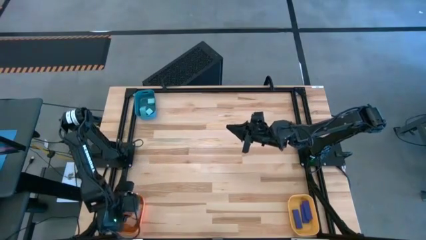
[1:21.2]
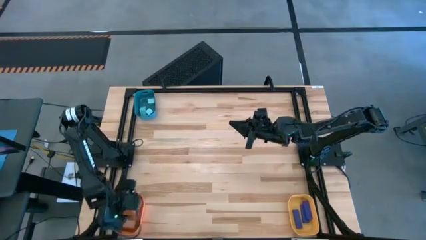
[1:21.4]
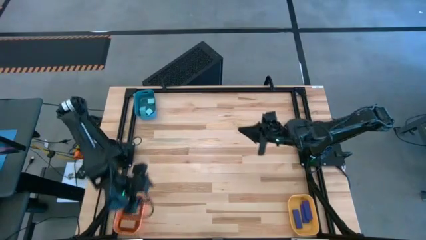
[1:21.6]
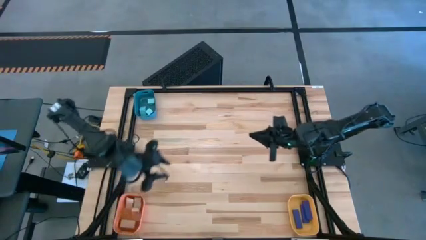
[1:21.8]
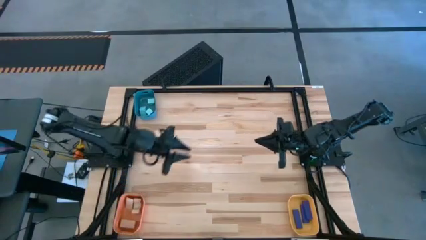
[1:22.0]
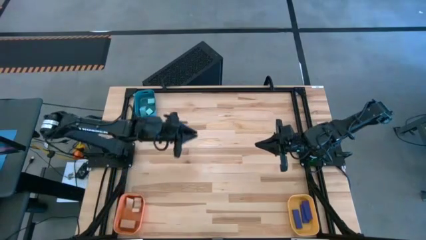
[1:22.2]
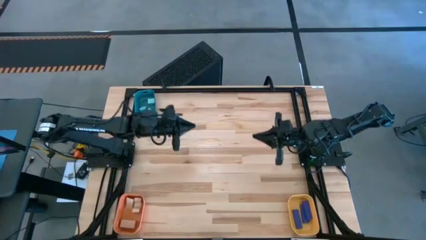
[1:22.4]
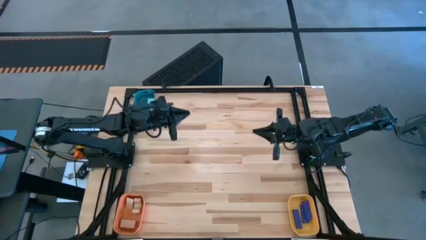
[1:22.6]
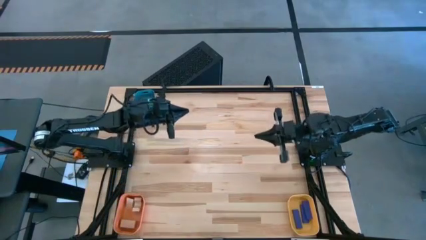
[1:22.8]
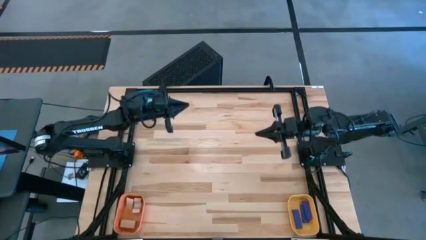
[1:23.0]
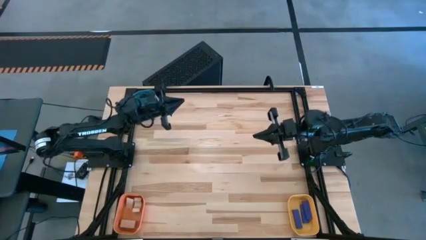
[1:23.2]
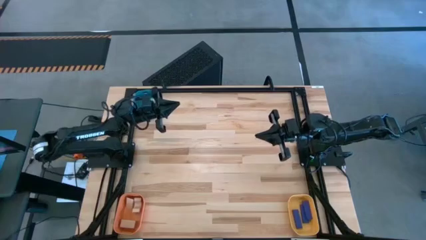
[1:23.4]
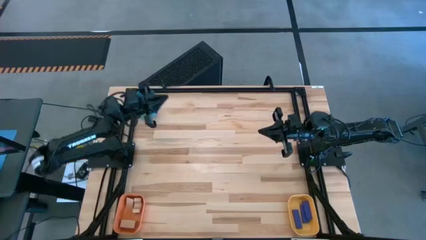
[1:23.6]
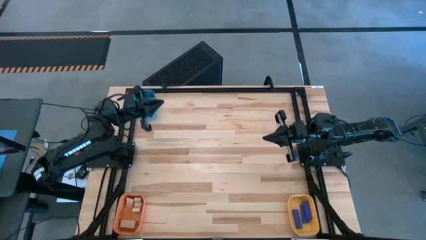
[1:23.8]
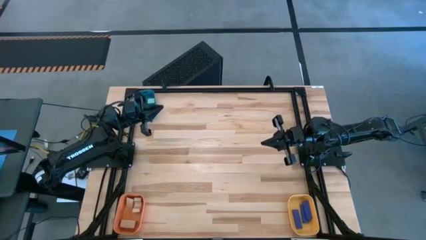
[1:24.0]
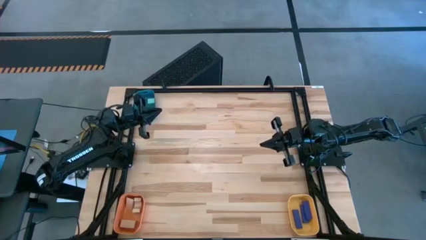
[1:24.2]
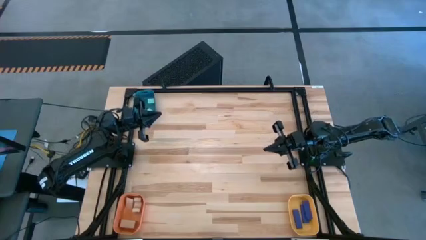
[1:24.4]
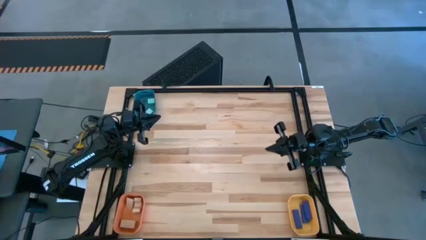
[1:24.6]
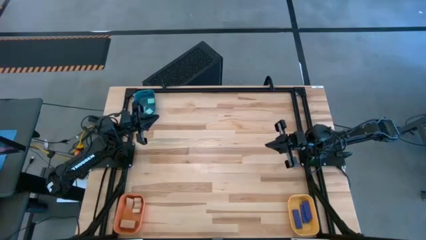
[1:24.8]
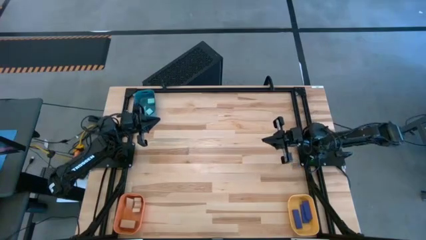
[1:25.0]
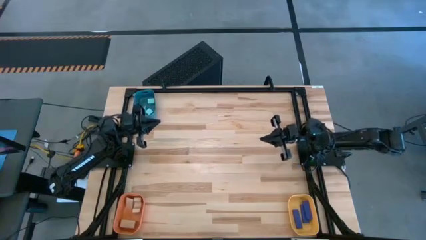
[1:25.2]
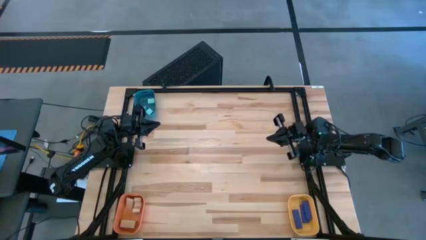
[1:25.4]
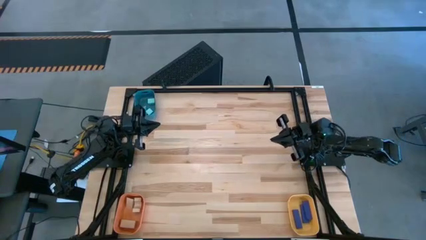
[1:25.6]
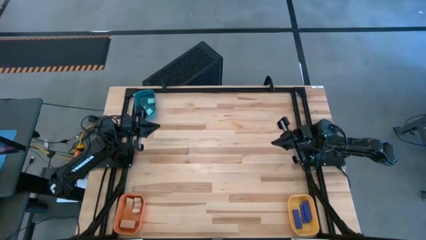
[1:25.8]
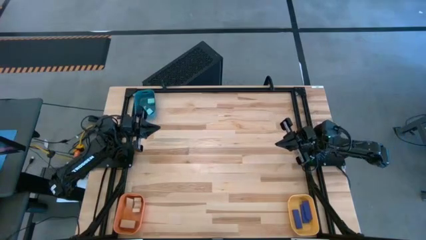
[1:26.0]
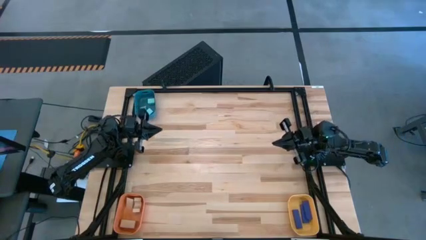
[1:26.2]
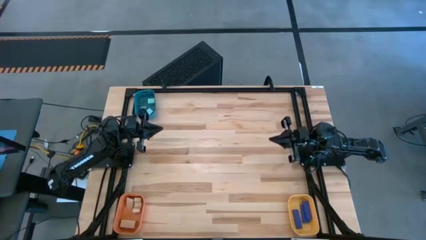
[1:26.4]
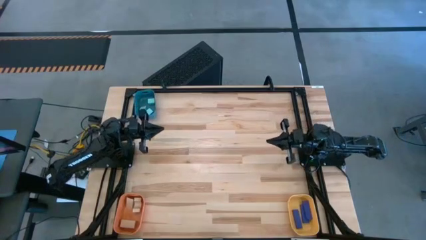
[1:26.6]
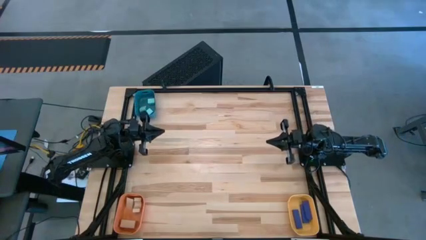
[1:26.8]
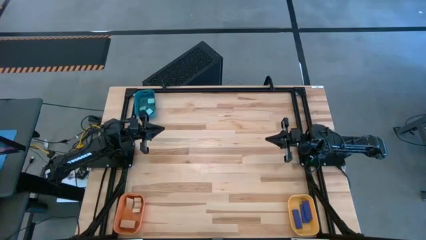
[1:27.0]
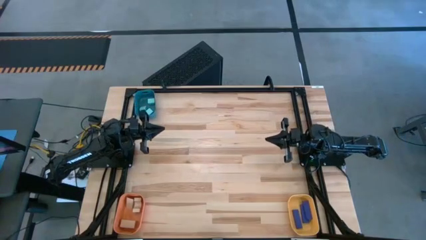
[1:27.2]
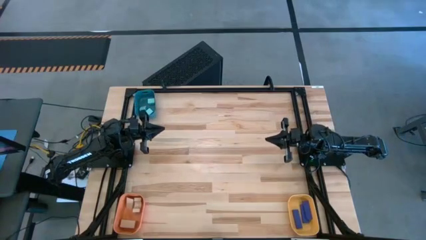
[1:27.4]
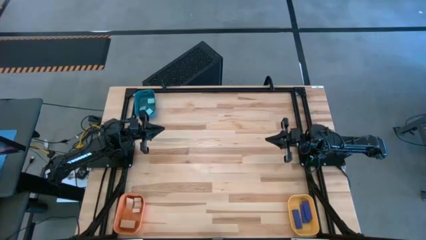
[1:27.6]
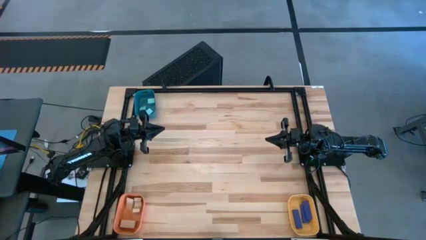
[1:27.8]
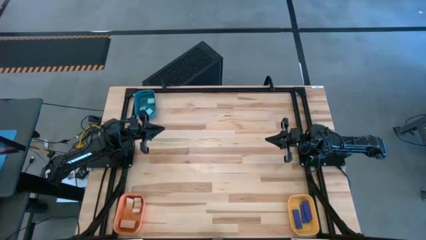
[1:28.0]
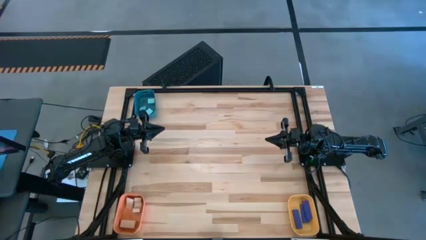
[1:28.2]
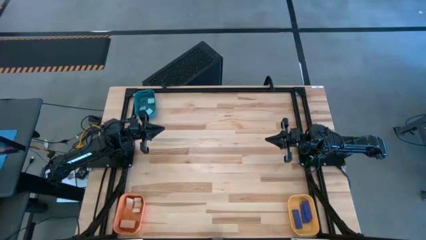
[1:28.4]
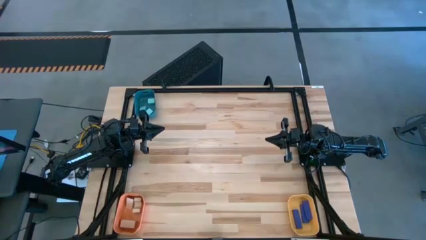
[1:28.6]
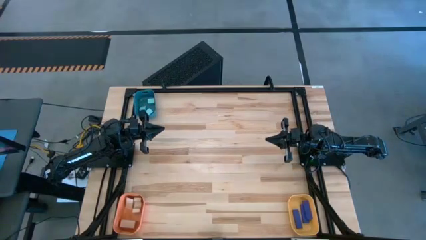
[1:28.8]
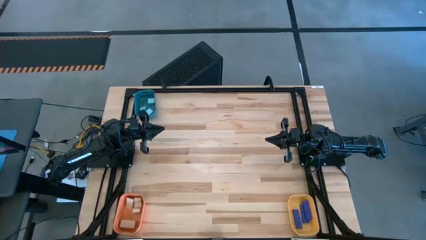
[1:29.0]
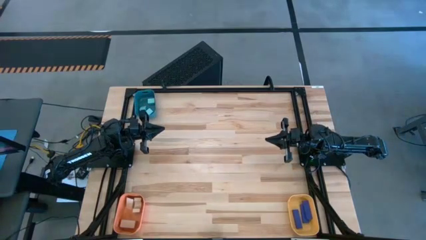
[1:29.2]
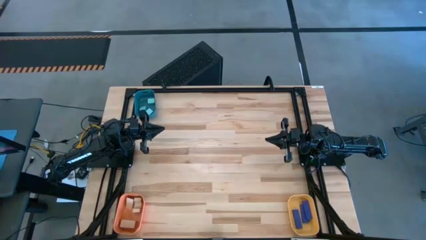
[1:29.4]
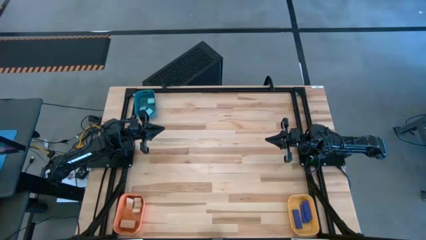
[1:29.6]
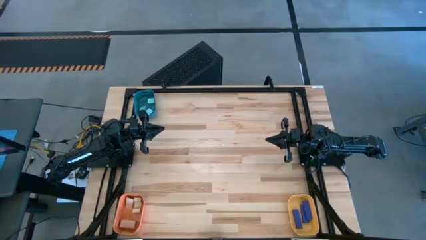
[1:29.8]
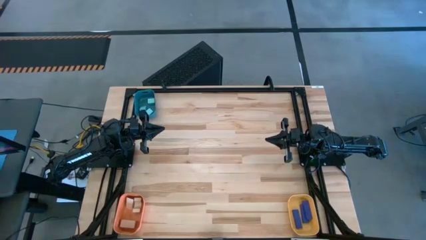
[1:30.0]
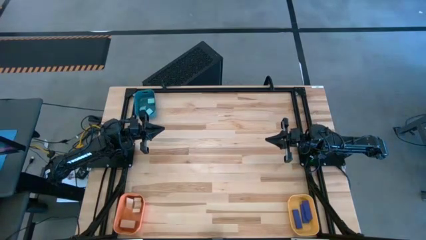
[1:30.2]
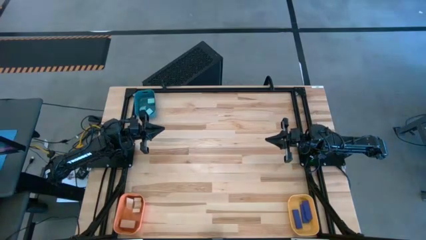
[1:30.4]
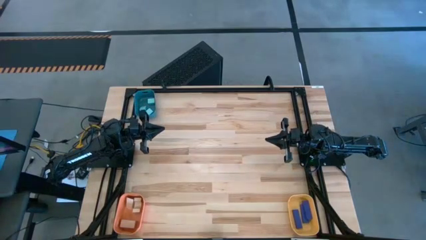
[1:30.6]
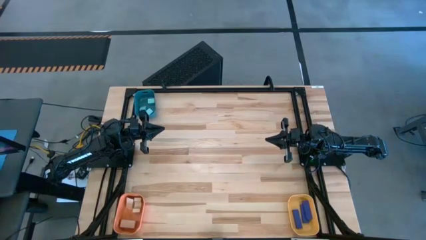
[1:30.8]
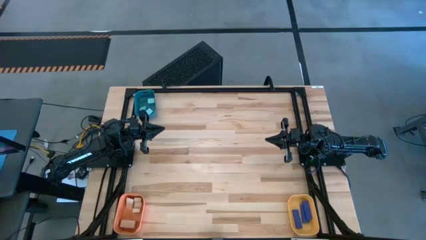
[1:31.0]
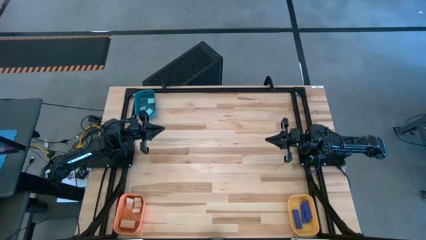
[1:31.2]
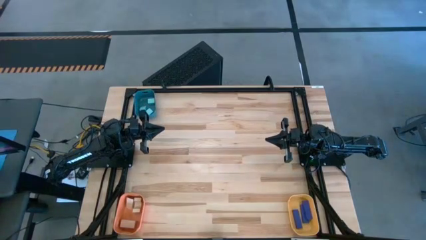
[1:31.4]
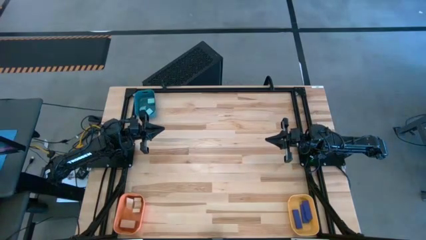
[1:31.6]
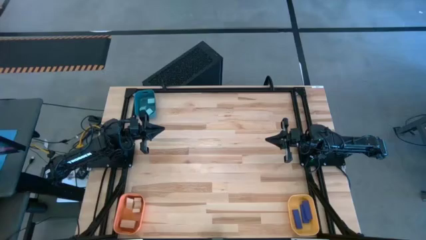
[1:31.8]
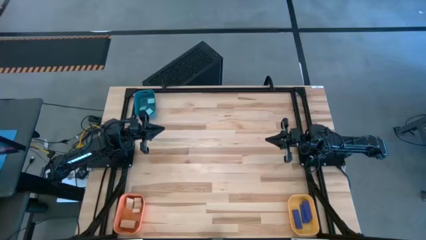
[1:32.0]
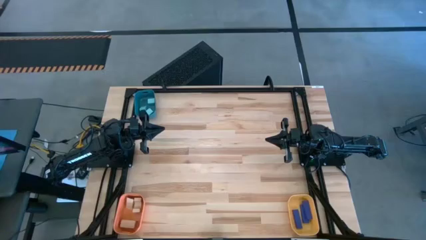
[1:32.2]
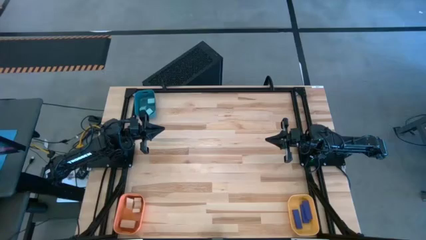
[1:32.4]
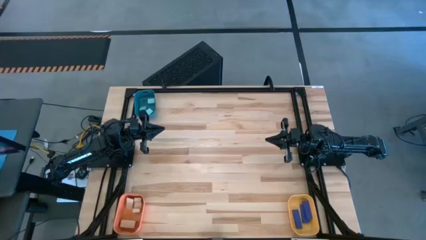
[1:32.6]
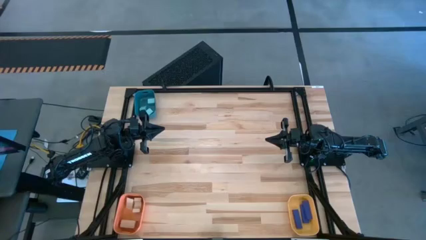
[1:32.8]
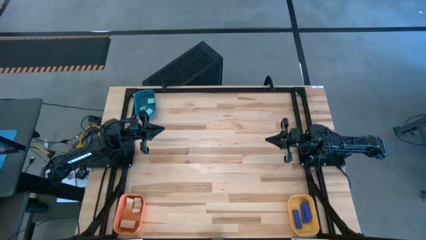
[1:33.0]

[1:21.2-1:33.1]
Task: Sort & place blocks by color
Return to Home Position

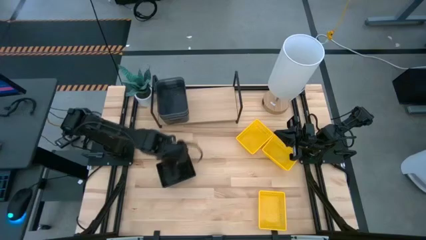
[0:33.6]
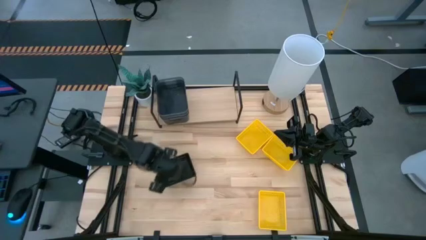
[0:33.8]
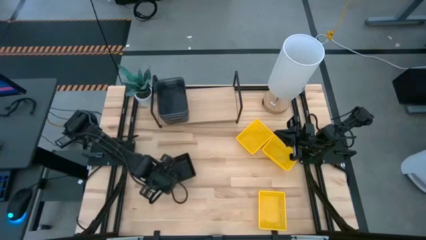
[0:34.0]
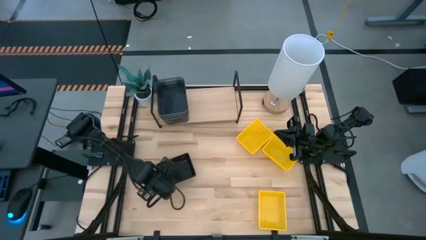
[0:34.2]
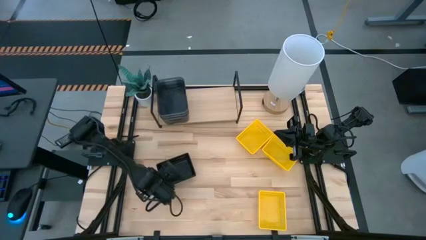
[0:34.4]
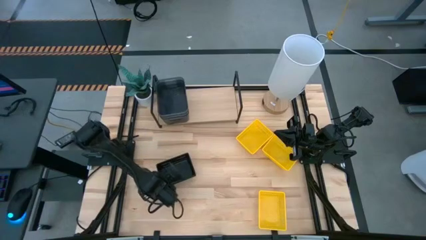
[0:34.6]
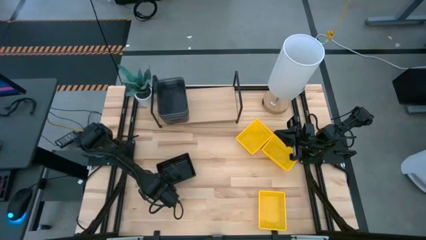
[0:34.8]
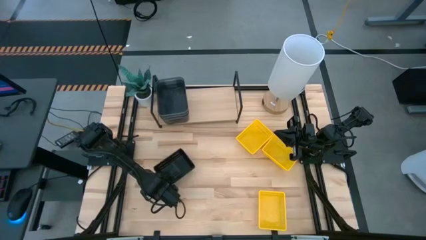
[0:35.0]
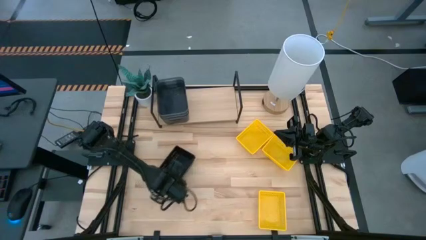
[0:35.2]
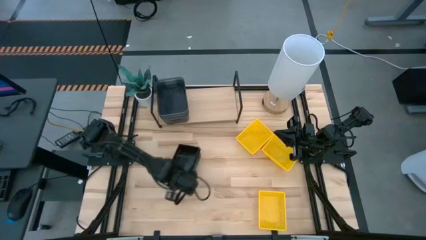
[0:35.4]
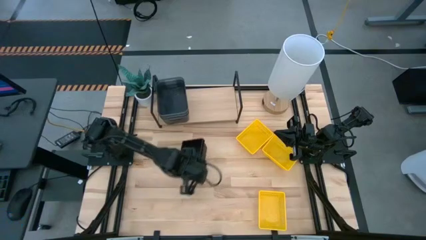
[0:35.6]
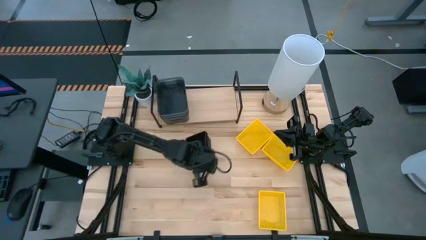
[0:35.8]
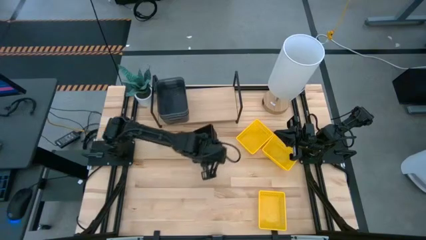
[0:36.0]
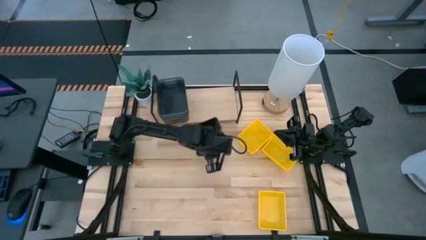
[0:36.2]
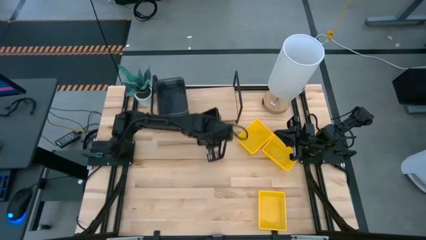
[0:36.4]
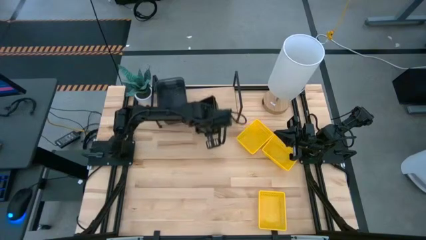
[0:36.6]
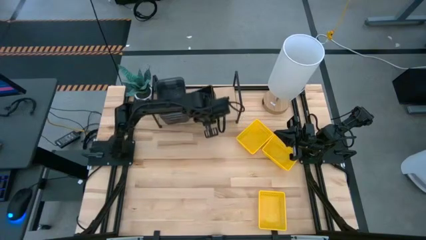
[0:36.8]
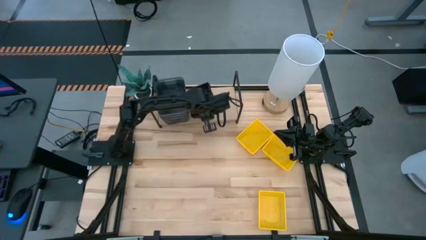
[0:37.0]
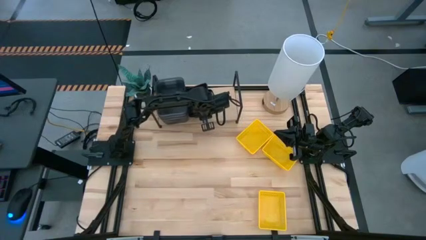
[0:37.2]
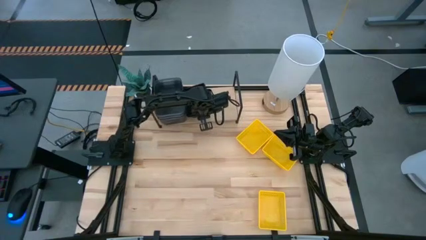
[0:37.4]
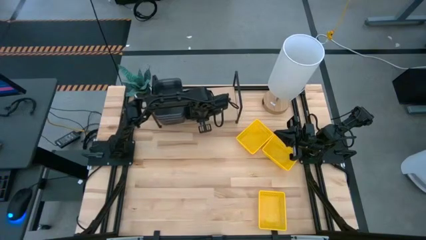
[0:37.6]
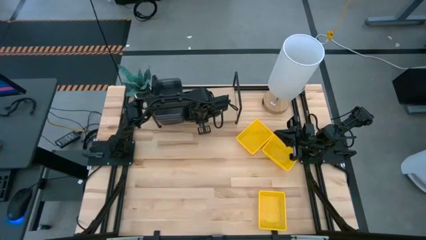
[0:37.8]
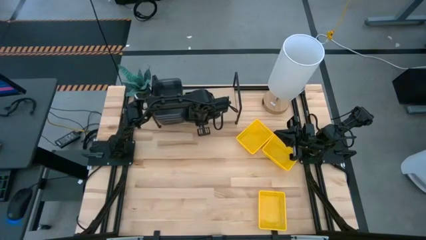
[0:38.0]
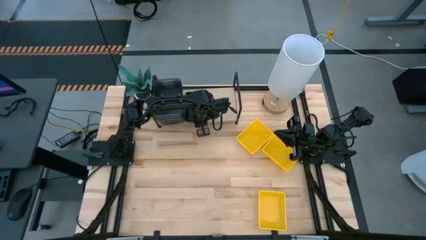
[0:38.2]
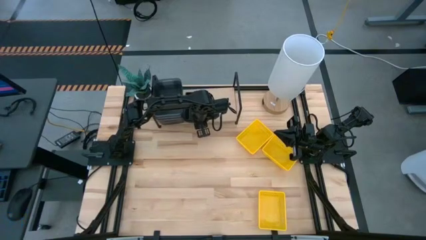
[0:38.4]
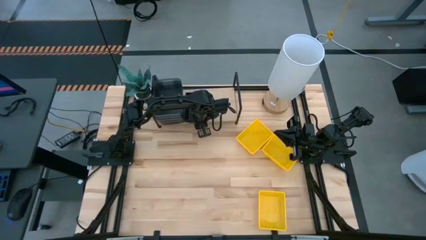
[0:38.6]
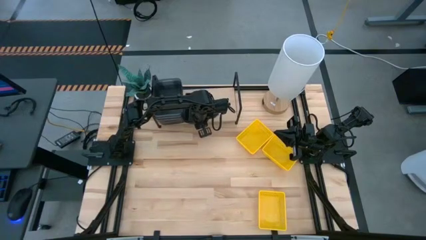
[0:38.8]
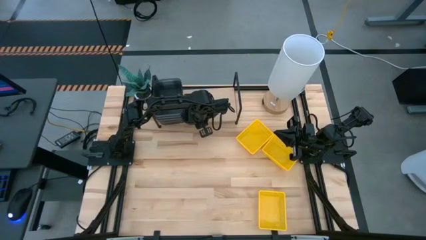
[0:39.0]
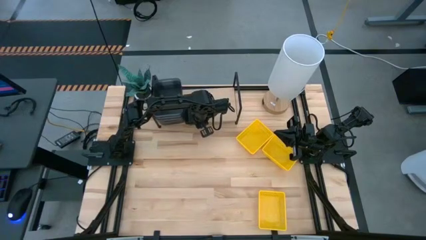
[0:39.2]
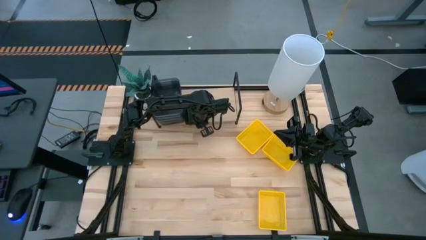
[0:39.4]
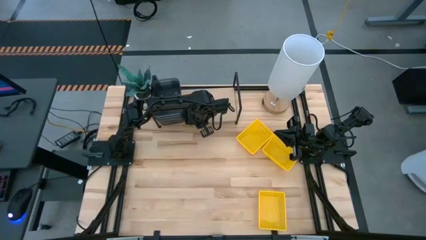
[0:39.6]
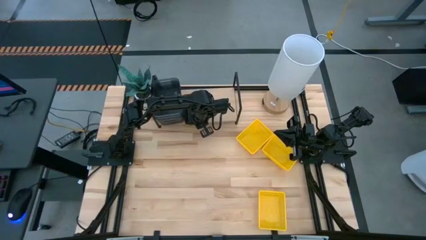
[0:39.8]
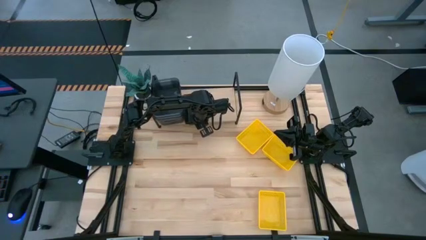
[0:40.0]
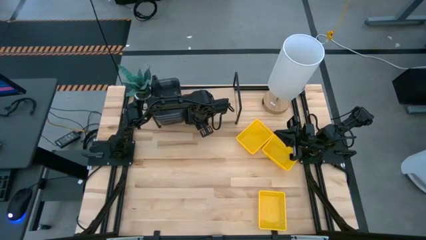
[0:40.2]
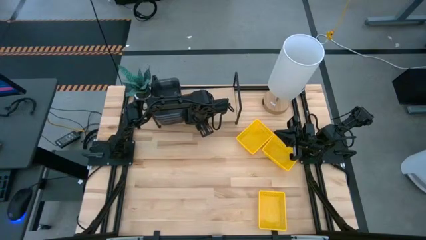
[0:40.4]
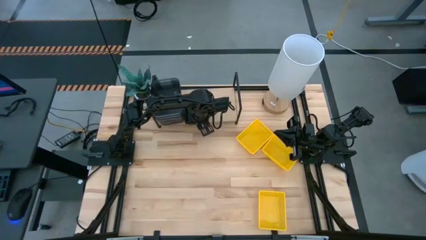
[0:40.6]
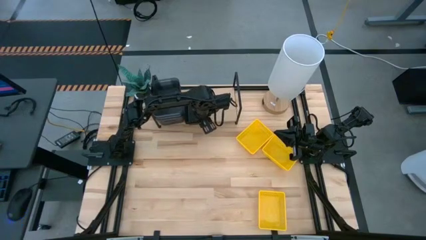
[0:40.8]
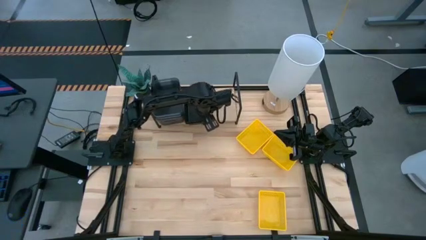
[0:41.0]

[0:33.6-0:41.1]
Task: Stack baskets on shelf by color
Put the black stacked baskets on the shelf
